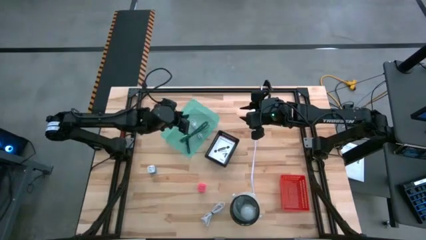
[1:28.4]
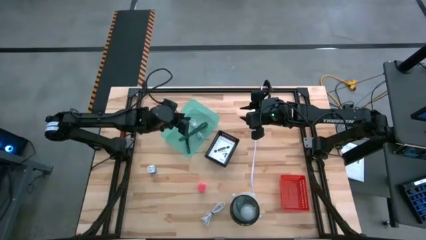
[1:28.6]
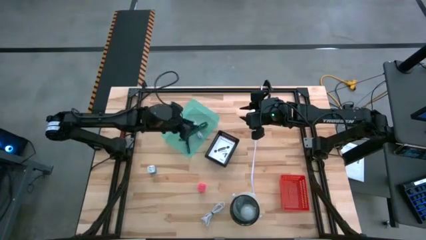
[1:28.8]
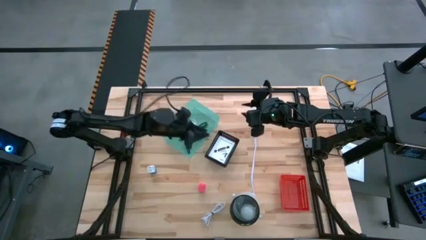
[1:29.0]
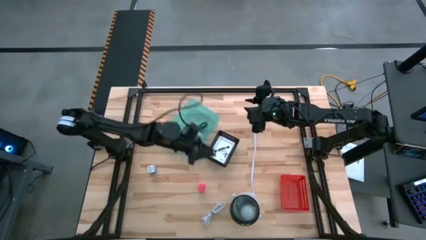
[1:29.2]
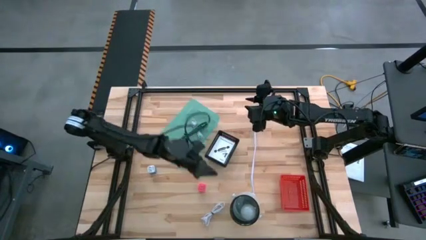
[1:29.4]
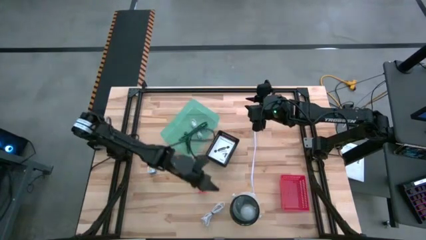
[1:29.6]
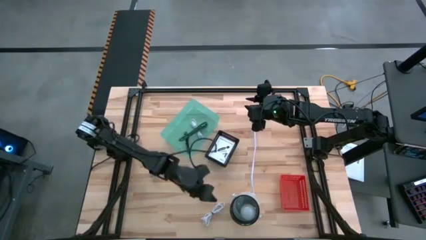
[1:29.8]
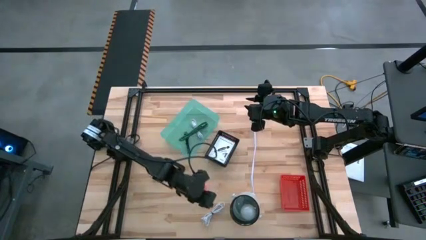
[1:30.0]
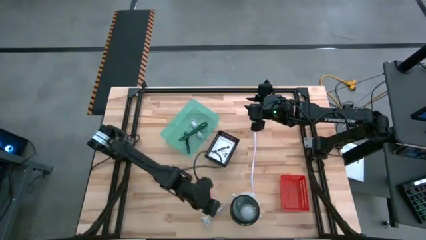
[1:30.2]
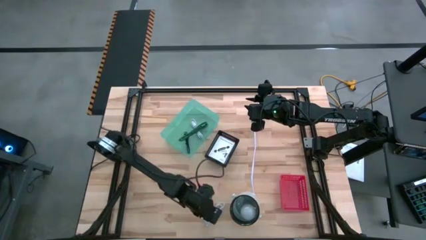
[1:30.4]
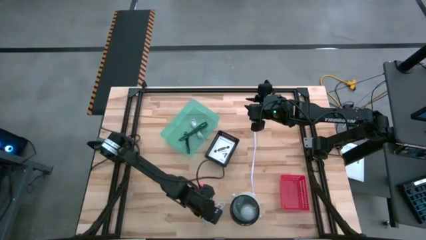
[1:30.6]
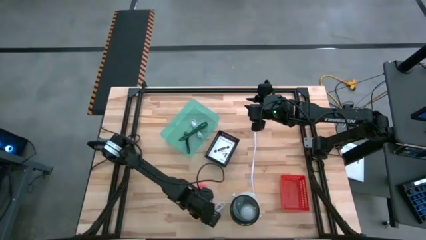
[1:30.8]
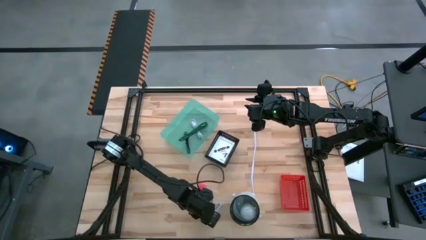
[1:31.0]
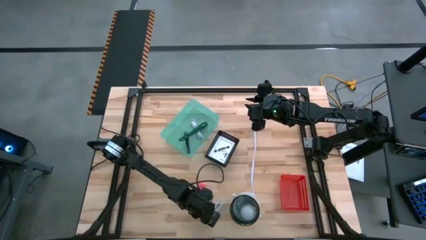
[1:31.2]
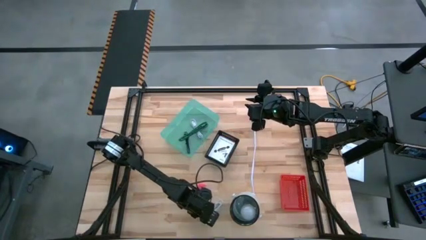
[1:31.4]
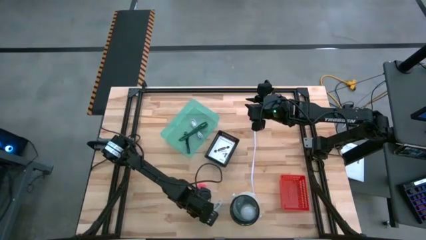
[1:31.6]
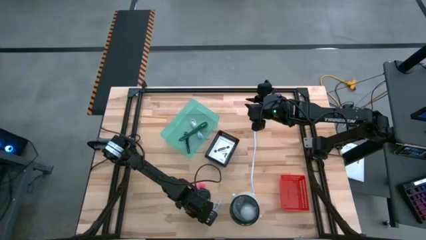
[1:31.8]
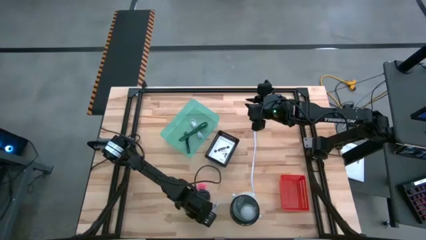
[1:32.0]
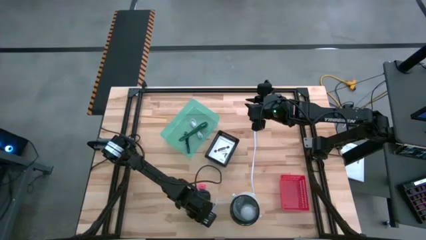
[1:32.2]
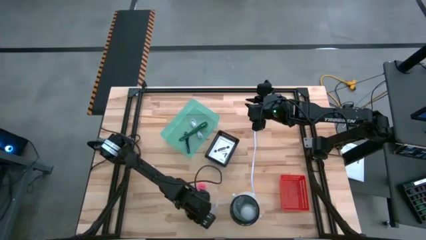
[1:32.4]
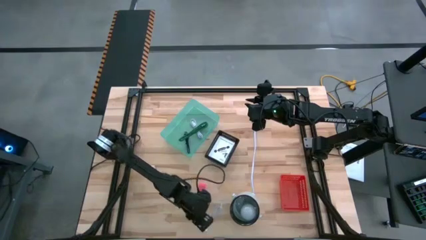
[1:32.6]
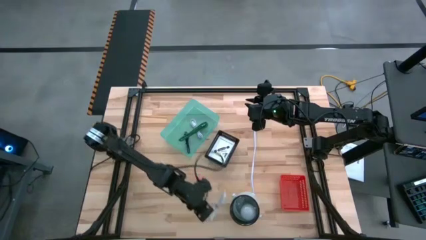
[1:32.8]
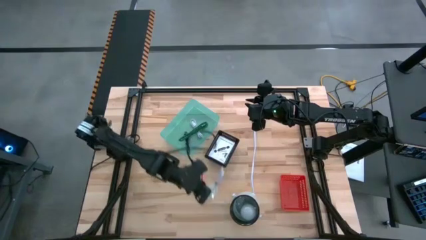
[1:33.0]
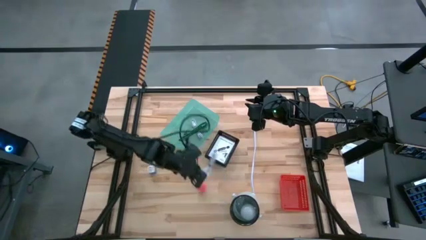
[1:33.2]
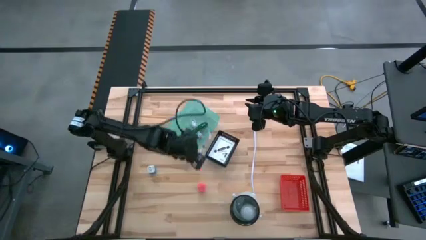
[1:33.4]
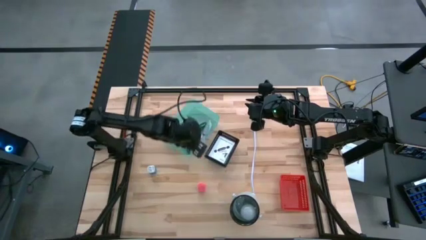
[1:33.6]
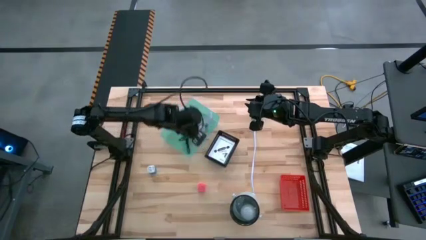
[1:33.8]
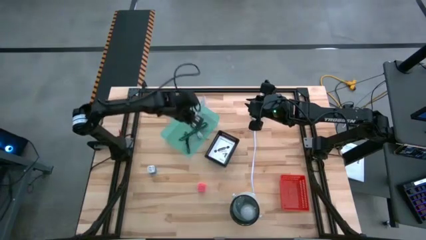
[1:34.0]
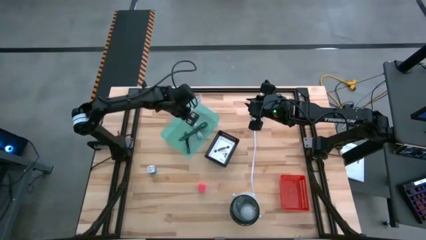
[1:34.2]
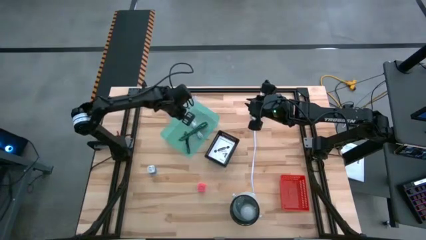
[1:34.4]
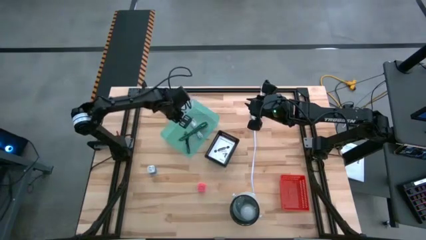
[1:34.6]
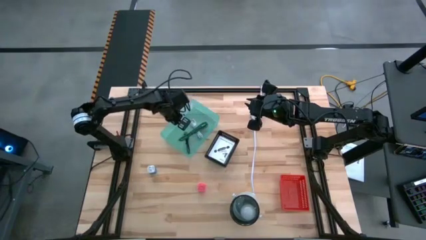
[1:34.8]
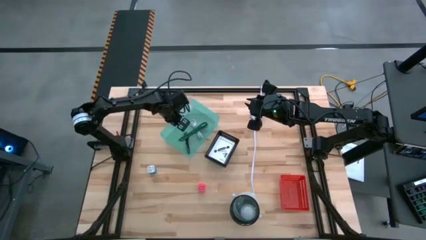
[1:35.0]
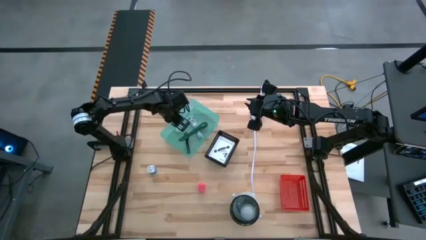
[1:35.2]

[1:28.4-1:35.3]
Task: Pick and place items into bin
Put the white charger cable into the green bin

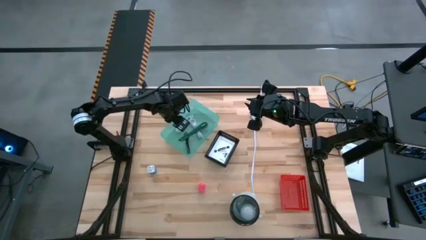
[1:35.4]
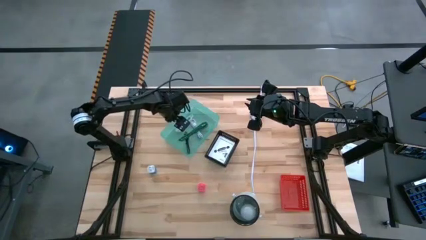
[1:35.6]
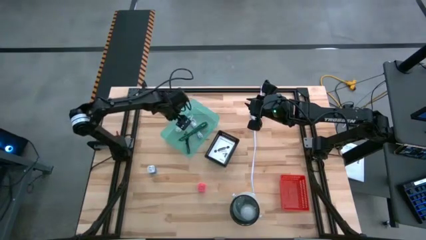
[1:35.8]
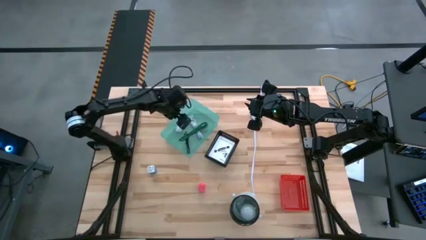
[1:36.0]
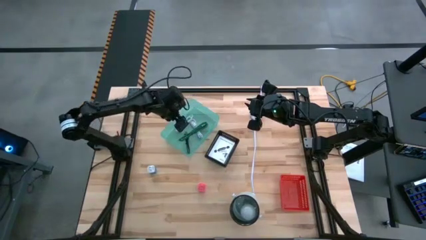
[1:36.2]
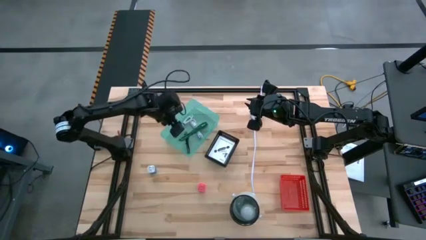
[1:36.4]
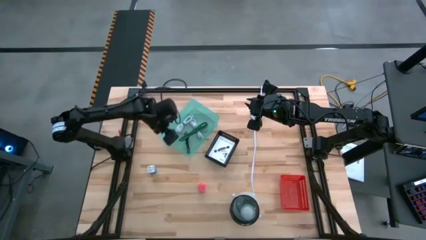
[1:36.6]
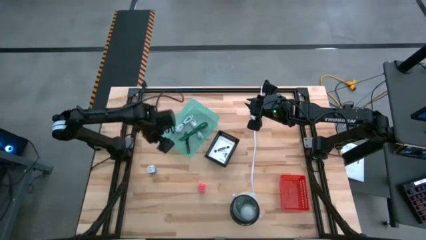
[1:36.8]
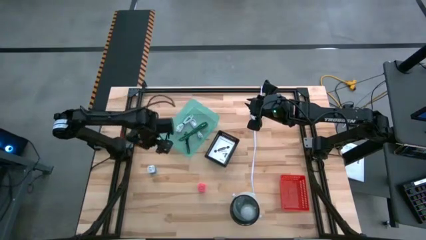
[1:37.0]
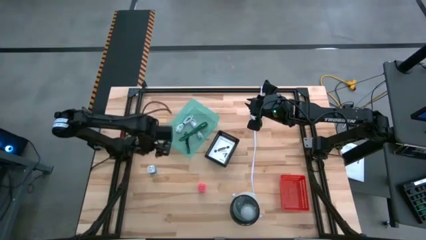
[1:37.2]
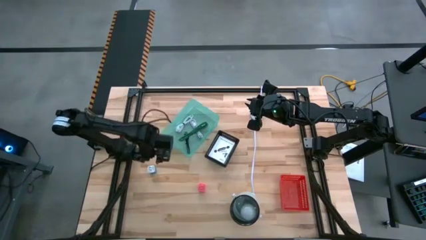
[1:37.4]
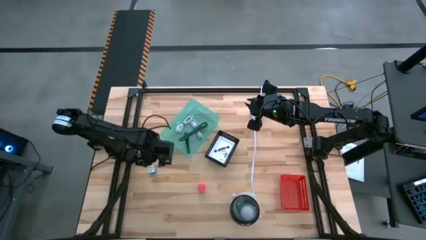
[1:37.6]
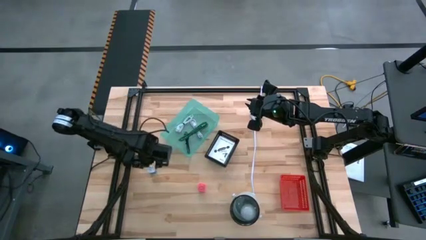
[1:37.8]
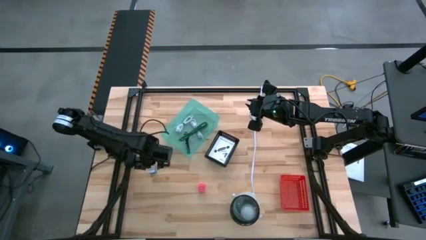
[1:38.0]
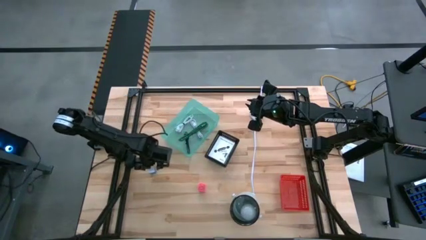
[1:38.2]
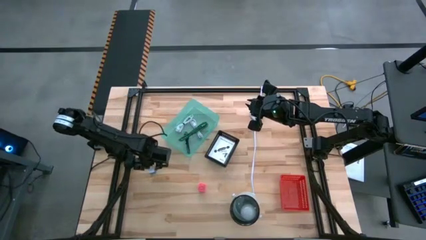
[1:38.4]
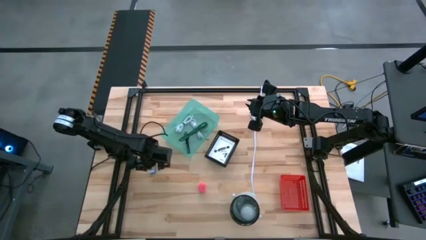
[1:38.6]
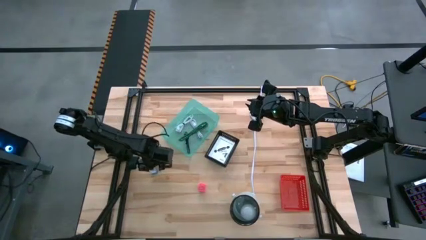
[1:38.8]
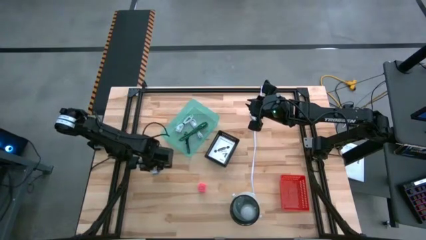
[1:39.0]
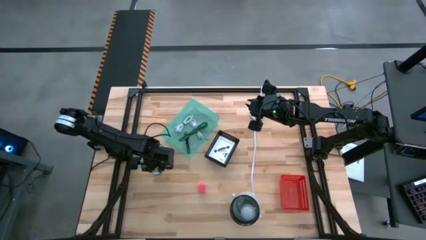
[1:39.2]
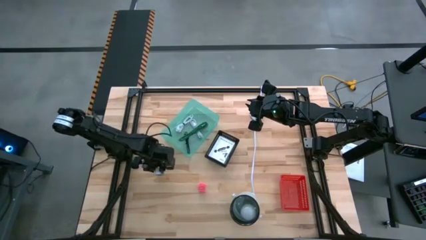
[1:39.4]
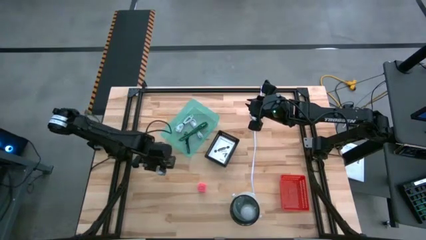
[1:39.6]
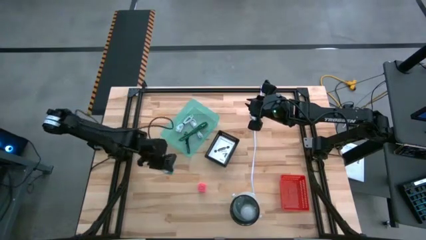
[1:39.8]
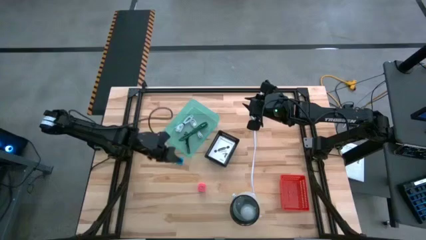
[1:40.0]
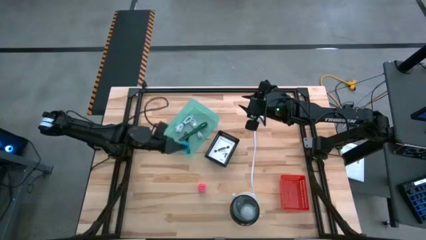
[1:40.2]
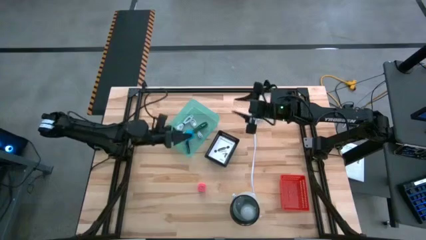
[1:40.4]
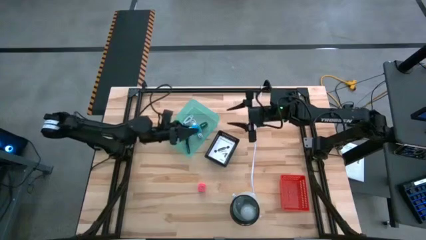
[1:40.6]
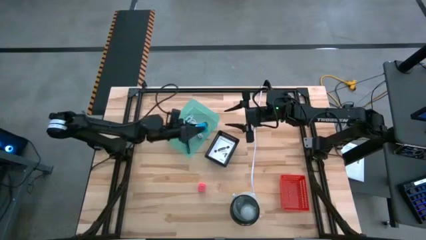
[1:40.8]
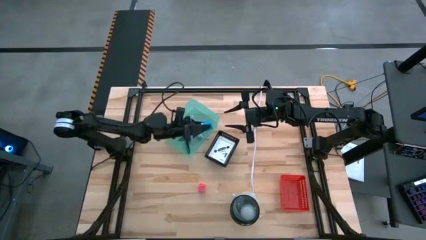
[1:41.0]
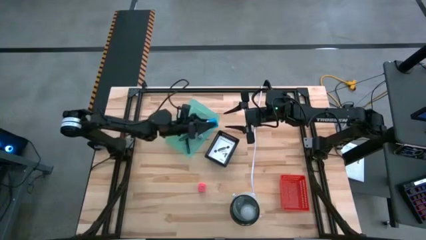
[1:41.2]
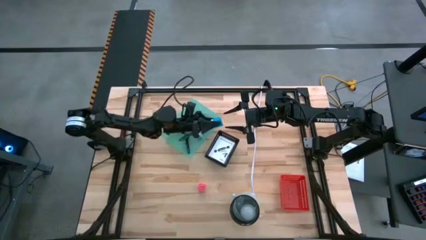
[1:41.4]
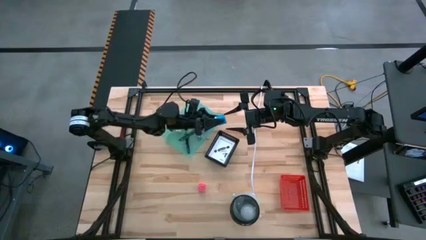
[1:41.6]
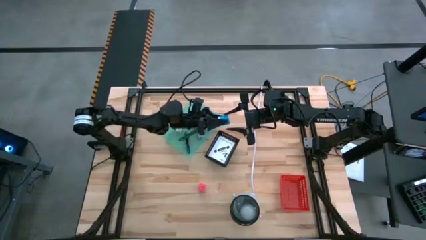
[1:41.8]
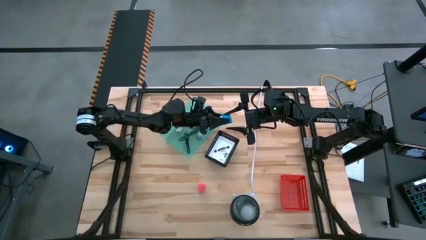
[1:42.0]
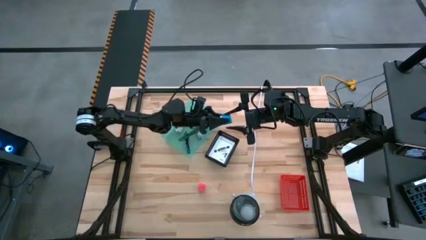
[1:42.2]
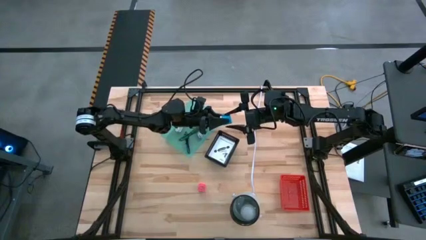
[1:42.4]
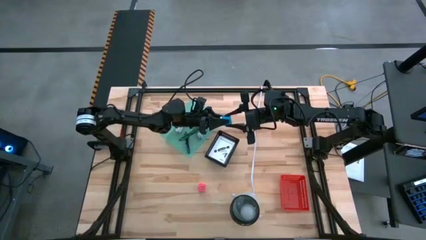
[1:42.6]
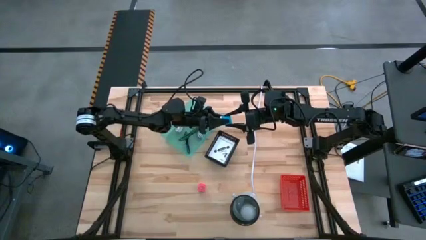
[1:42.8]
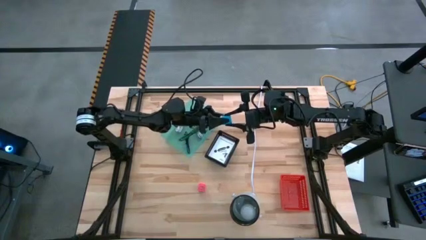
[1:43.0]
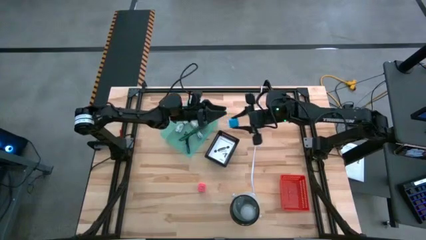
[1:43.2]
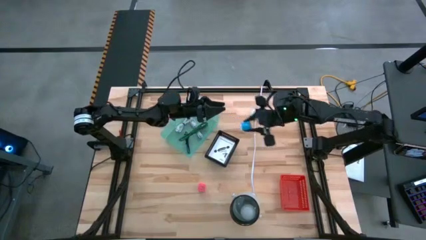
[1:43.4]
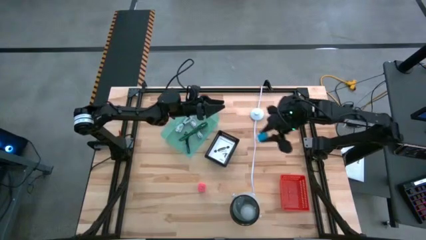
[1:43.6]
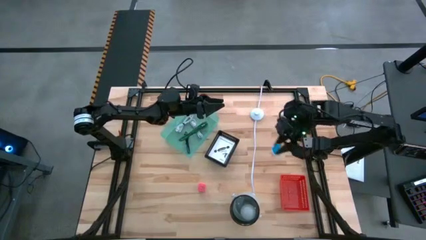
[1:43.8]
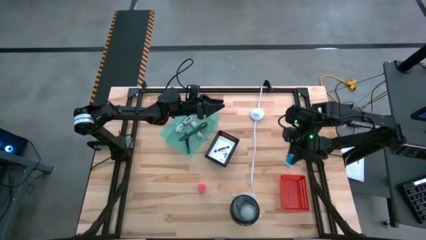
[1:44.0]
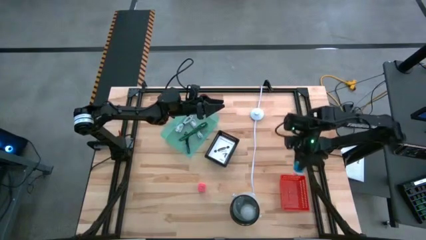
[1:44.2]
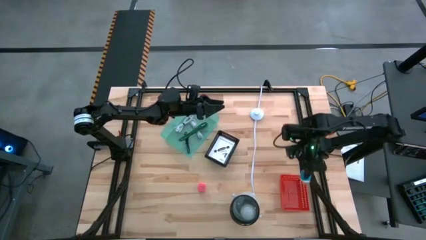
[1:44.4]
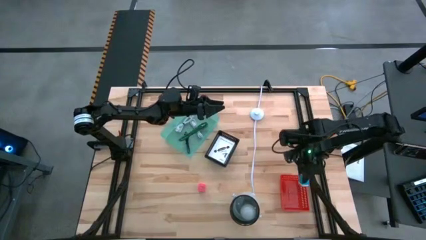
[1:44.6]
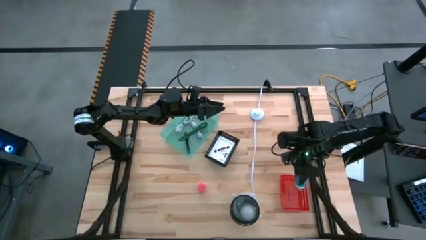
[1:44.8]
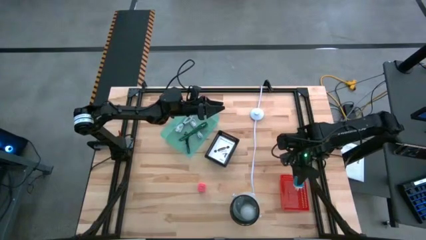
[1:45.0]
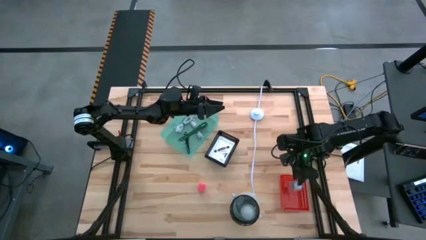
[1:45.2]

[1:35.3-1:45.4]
Put the blue charger adaptor into the red bin
